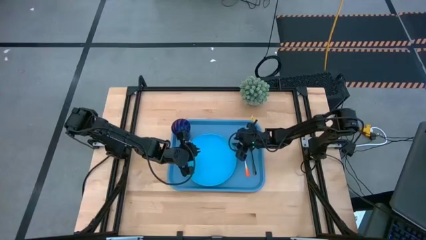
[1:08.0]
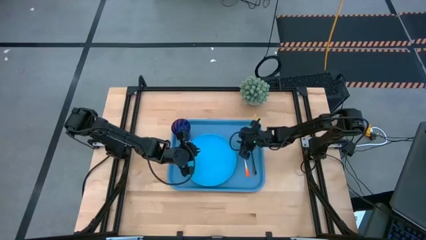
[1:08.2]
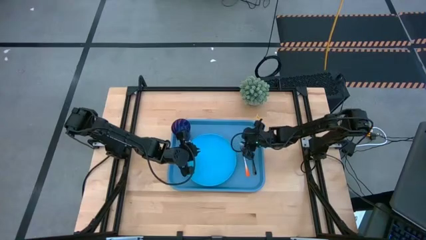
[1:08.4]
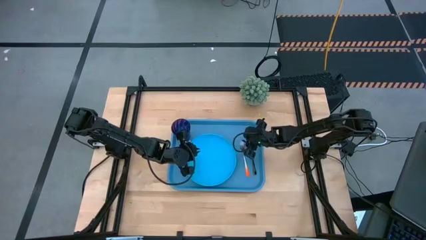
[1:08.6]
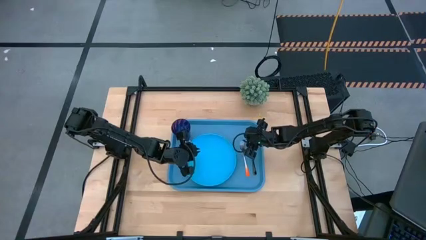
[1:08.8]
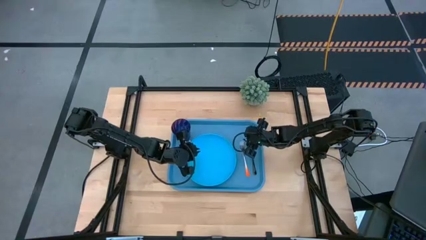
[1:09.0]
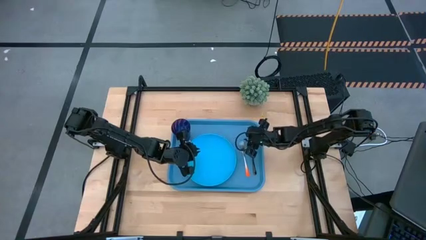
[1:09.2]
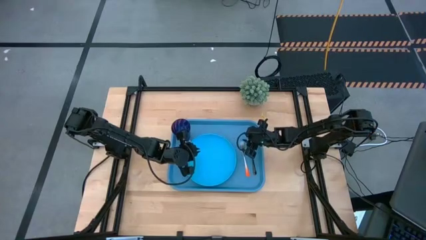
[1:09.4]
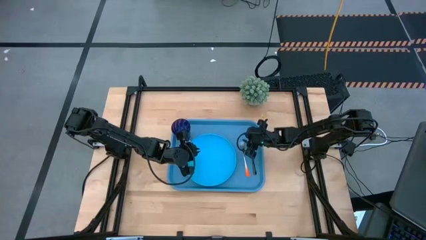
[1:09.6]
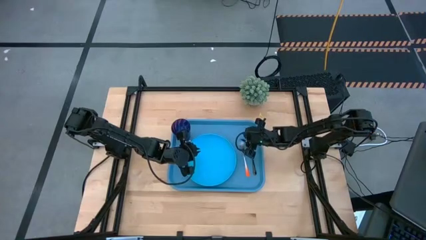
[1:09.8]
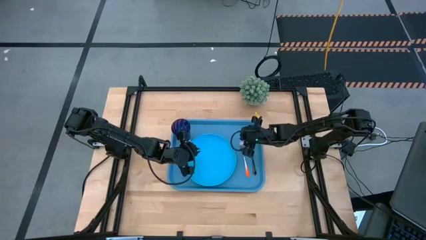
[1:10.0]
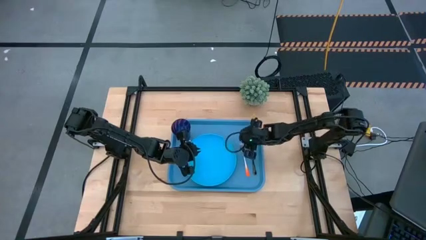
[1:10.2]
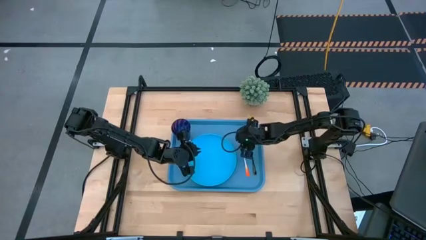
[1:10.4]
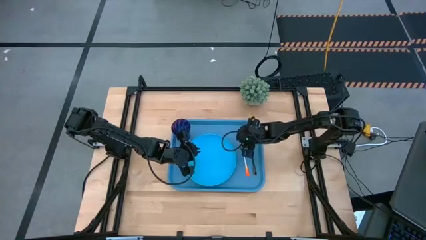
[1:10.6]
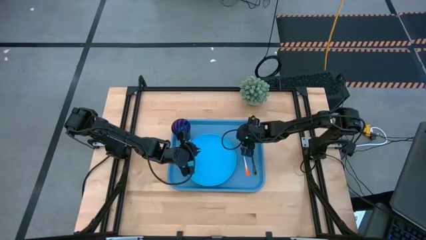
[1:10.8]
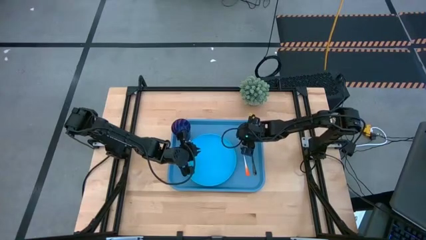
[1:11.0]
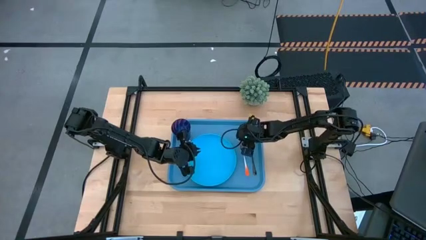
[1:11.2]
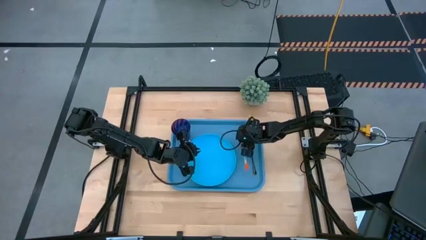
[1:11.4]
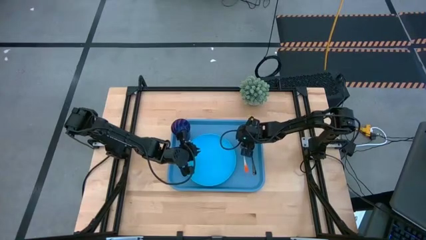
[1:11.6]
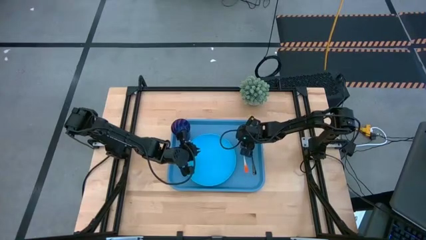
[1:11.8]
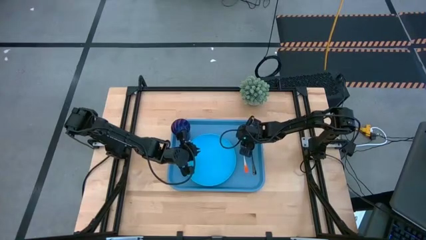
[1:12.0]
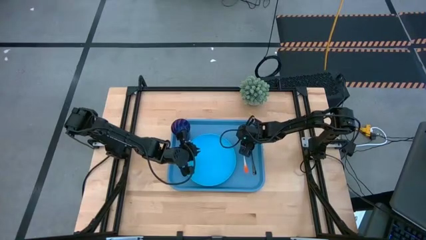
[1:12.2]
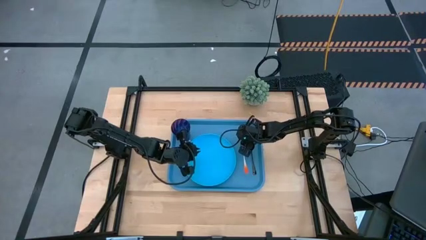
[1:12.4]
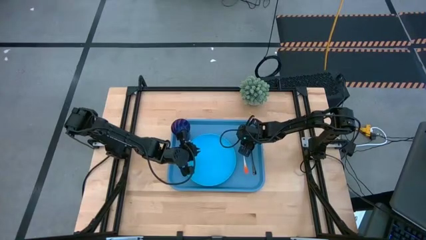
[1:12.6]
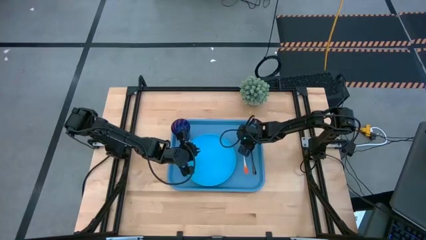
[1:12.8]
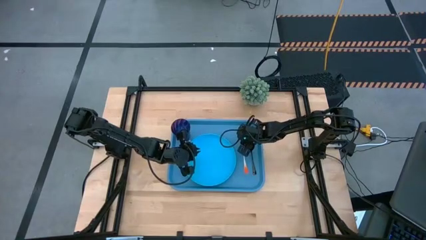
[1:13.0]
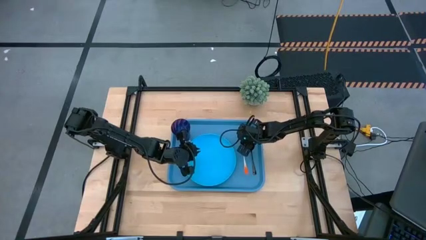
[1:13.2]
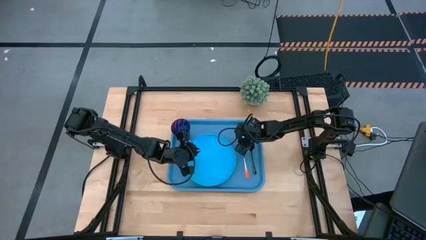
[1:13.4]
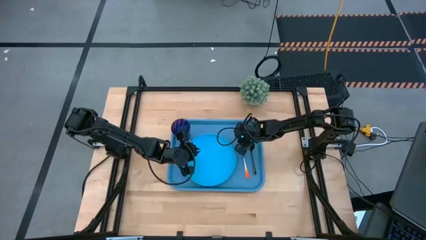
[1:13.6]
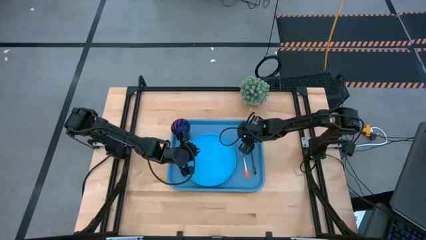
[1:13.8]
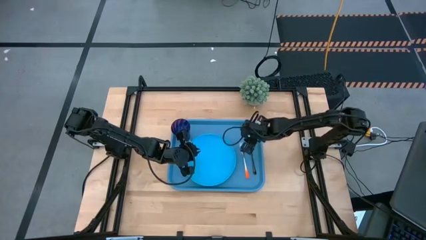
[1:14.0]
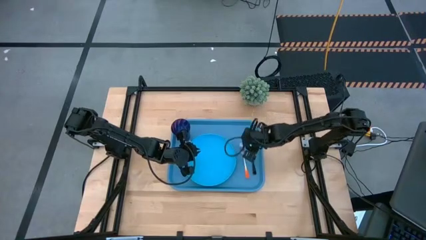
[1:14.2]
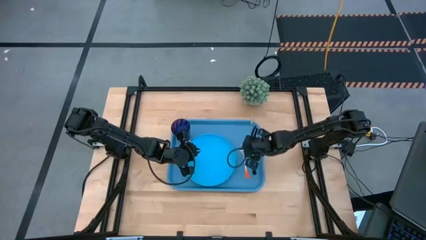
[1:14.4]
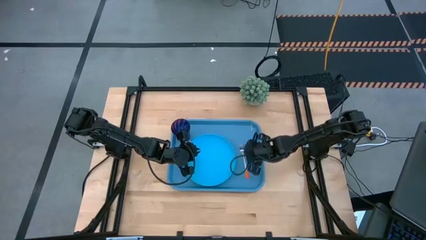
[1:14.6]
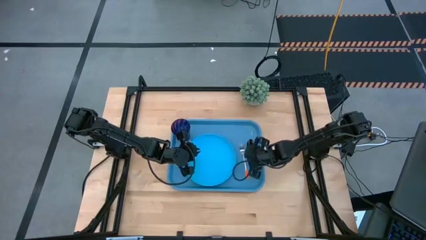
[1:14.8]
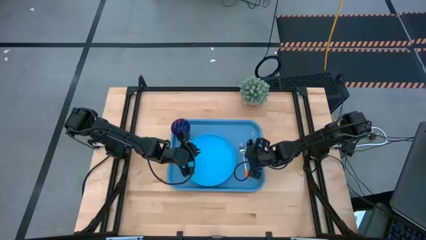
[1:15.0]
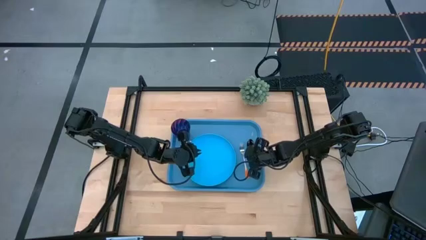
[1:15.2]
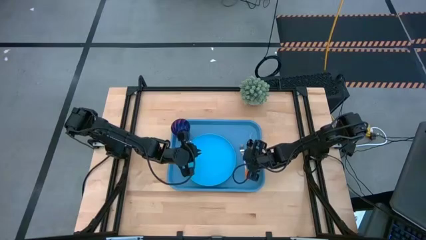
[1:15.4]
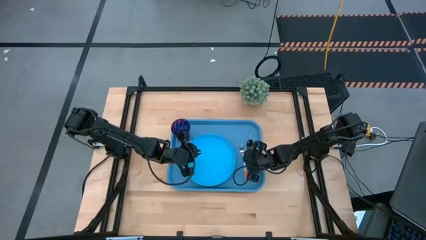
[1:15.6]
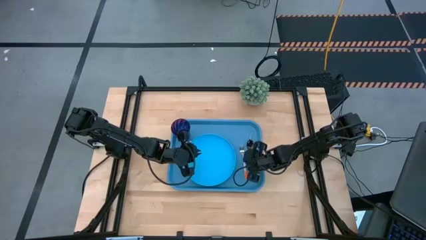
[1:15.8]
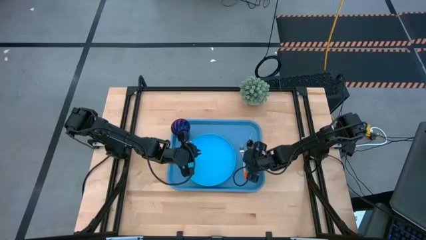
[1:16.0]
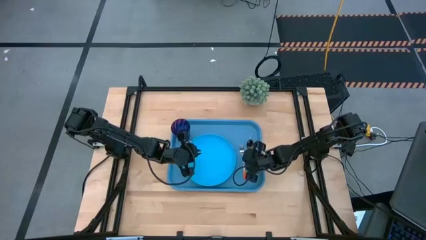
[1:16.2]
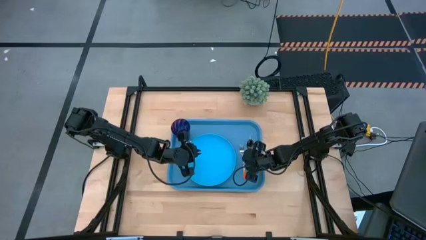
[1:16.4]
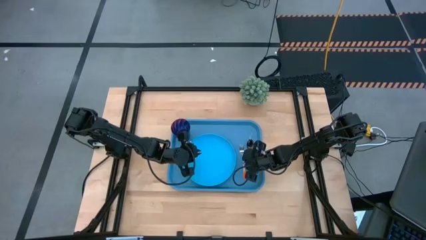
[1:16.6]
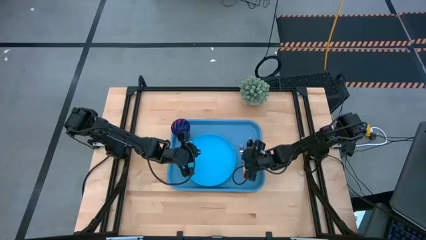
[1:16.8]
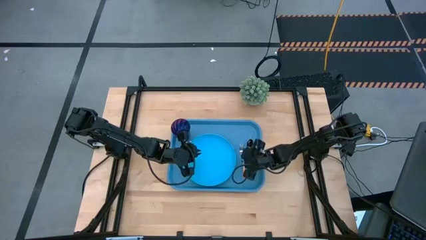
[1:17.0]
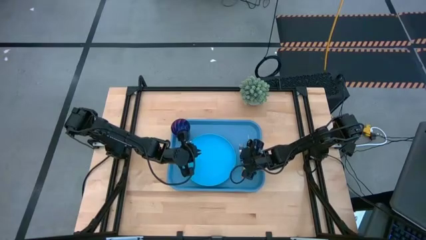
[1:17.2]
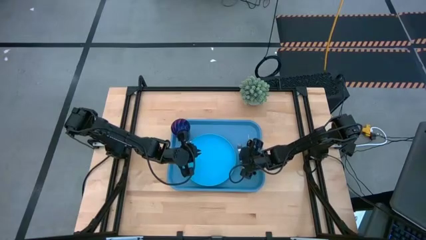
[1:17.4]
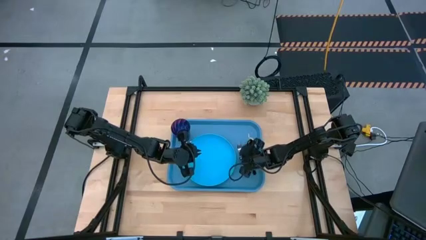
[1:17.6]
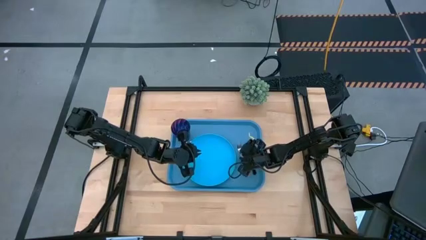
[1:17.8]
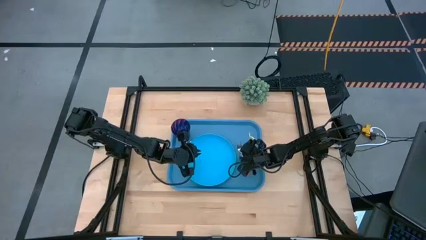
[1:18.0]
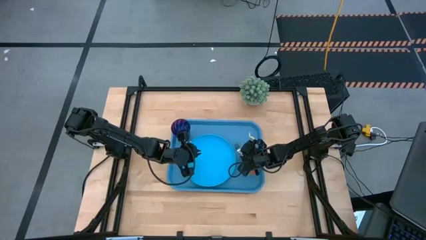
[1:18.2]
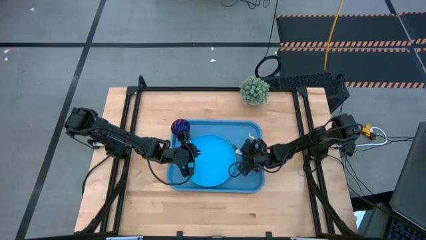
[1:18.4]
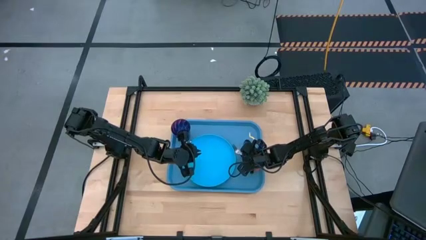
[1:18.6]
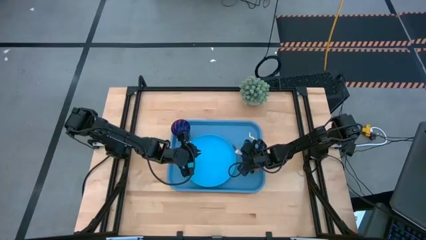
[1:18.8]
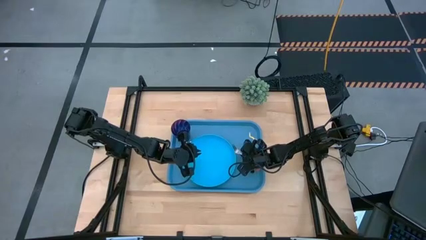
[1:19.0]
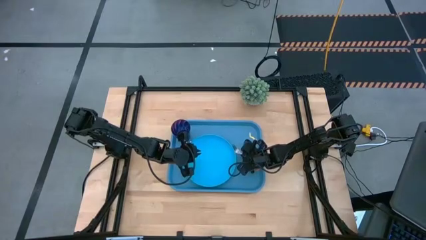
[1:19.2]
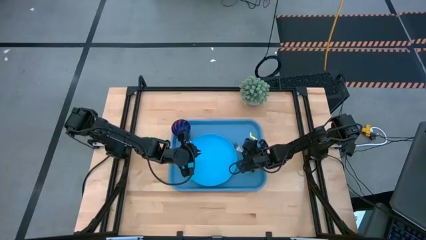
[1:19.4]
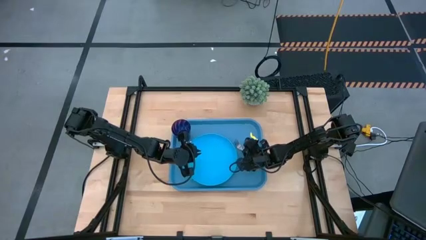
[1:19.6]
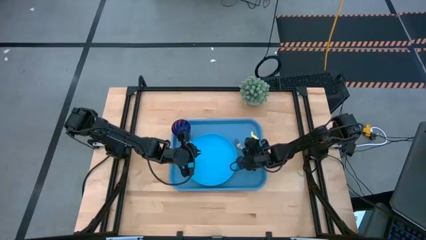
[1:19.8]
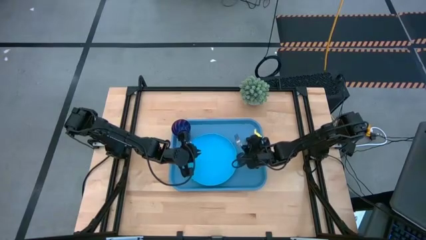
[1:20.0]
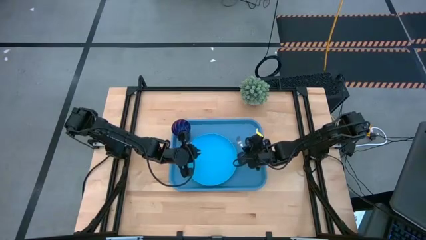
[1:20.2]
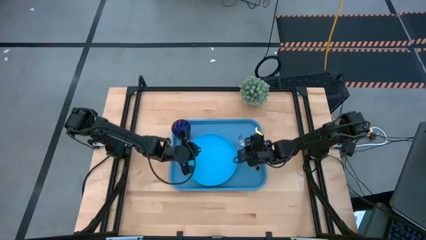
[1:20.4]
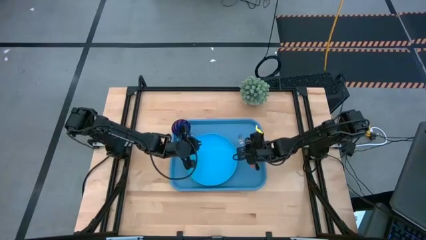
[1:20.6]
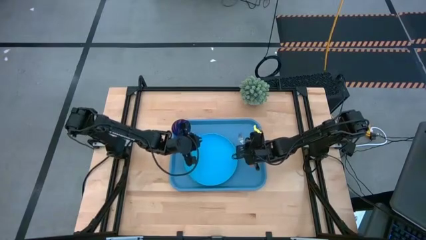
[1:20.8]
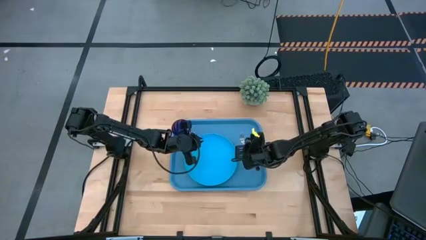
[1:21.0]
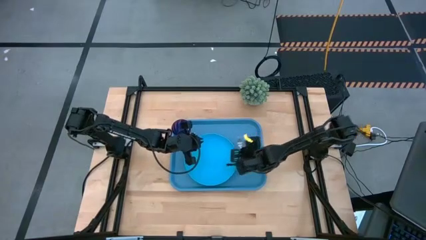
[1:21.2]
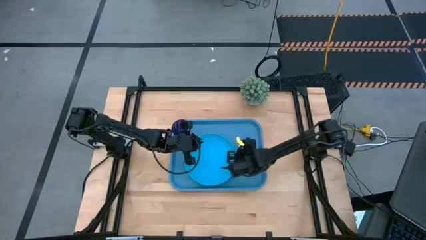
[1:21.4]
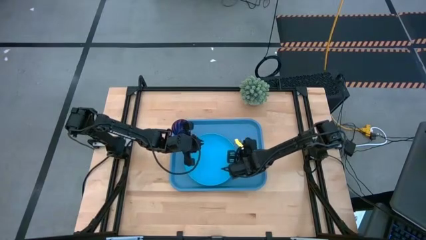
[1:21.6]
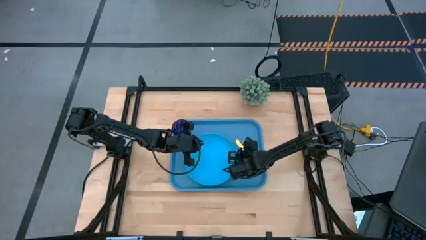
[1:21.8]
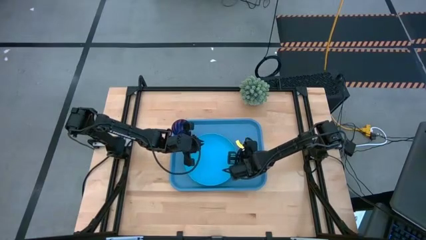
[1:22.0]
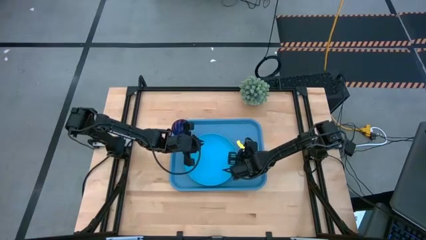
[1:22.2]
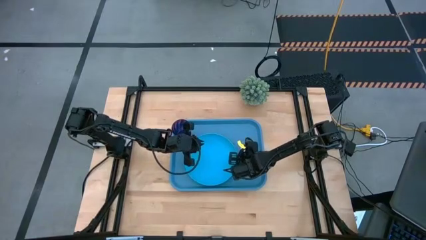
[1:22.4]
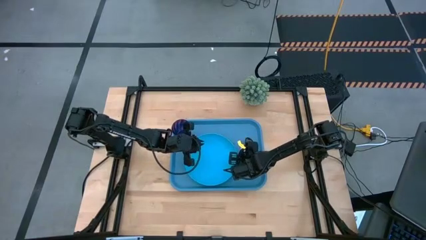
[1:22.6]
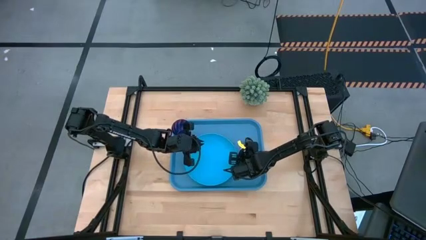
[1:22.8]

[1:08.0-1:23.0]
Task: Pick and place plate/cup/fork/spoon on tray
Adjust the orange fork
